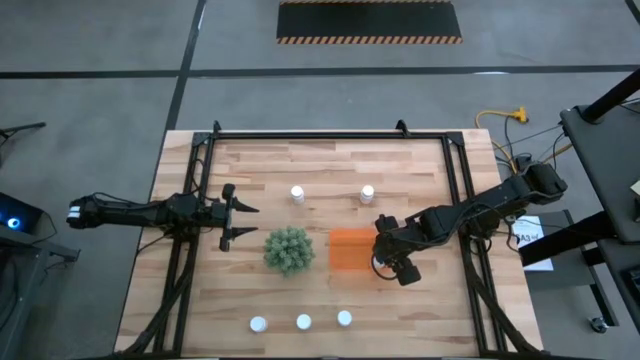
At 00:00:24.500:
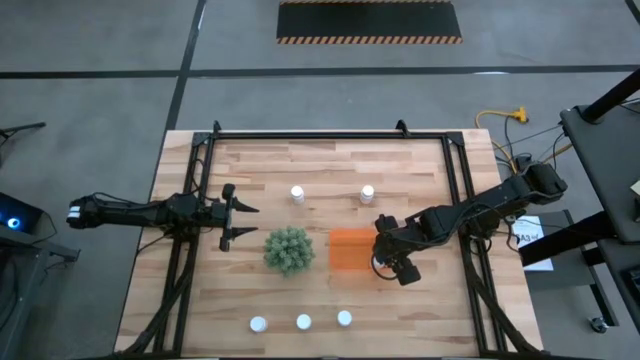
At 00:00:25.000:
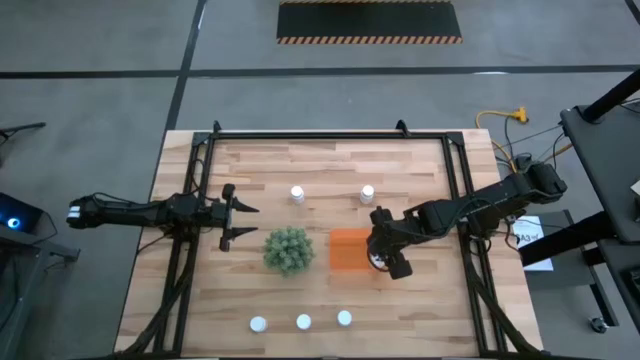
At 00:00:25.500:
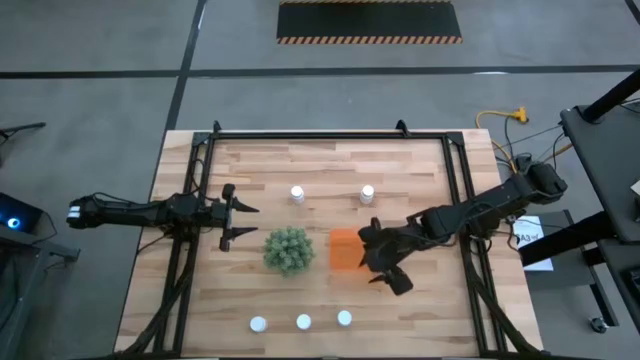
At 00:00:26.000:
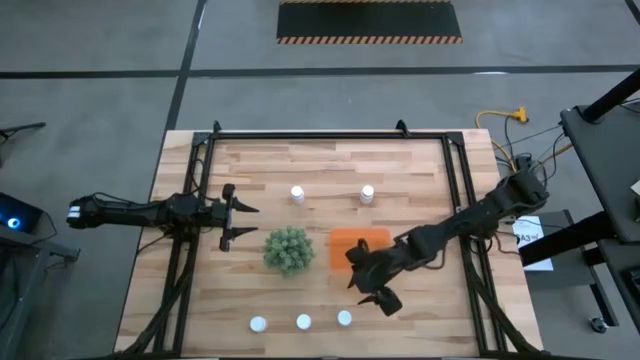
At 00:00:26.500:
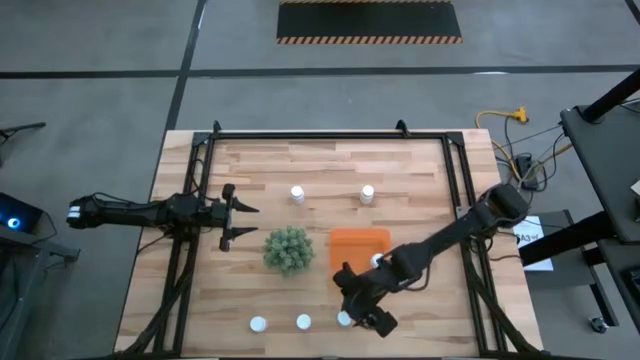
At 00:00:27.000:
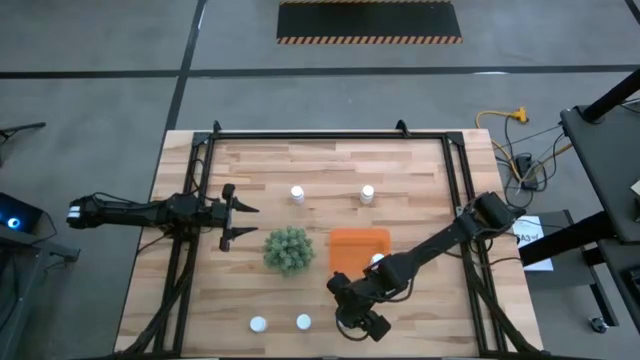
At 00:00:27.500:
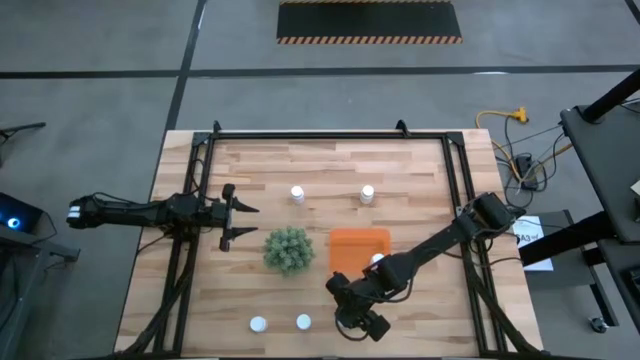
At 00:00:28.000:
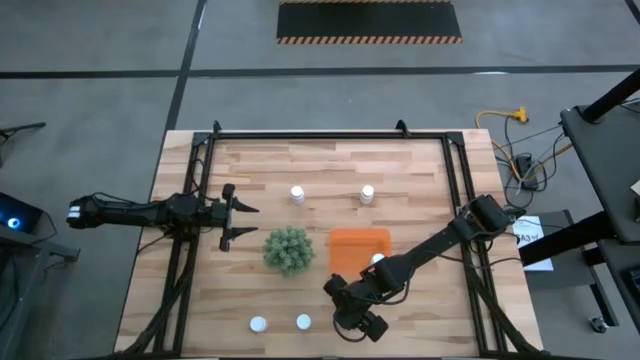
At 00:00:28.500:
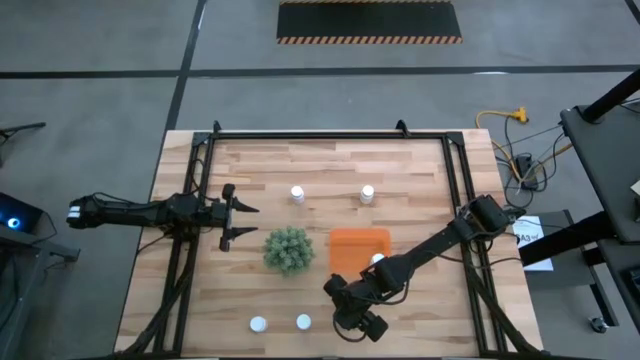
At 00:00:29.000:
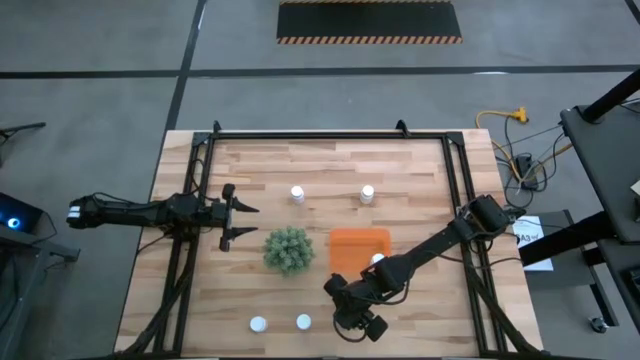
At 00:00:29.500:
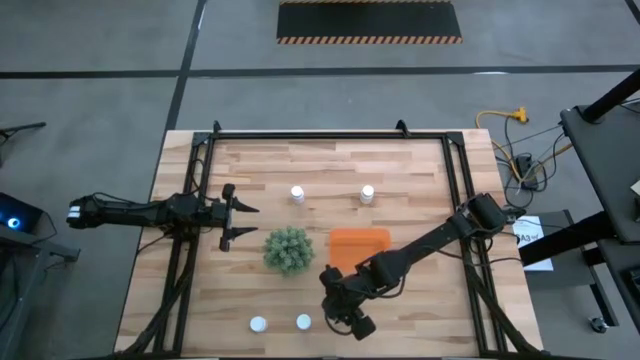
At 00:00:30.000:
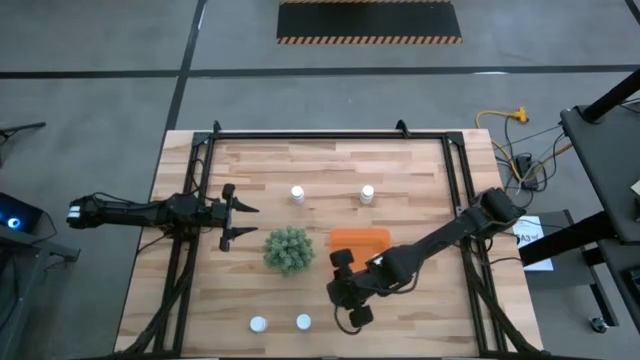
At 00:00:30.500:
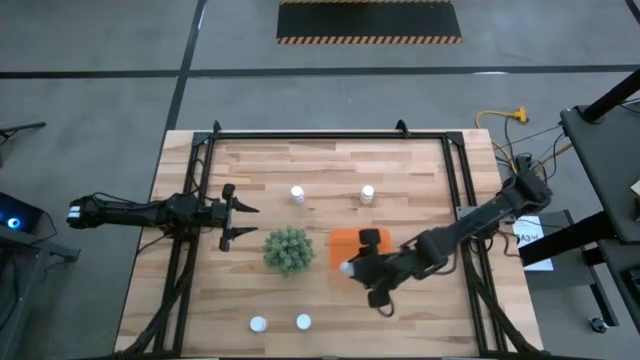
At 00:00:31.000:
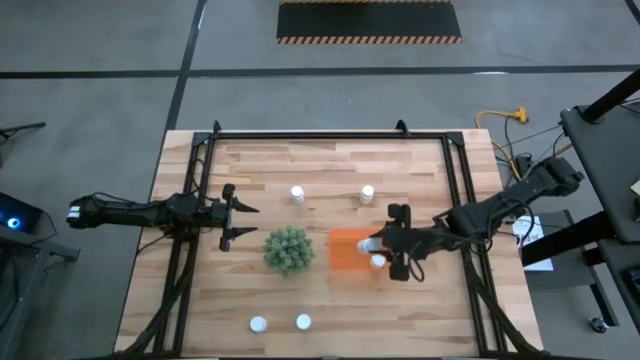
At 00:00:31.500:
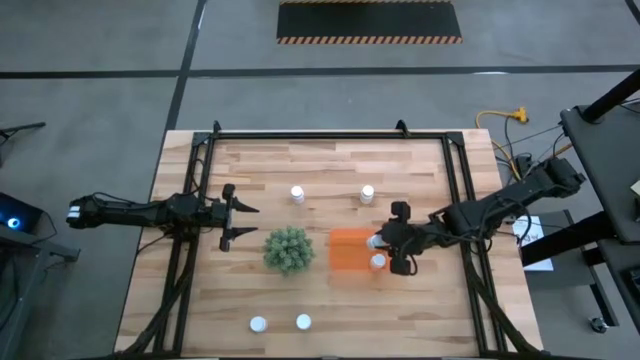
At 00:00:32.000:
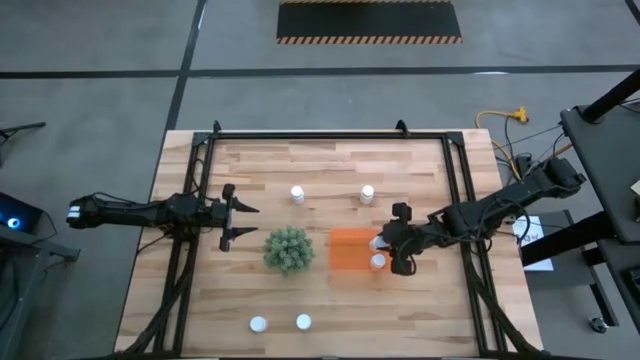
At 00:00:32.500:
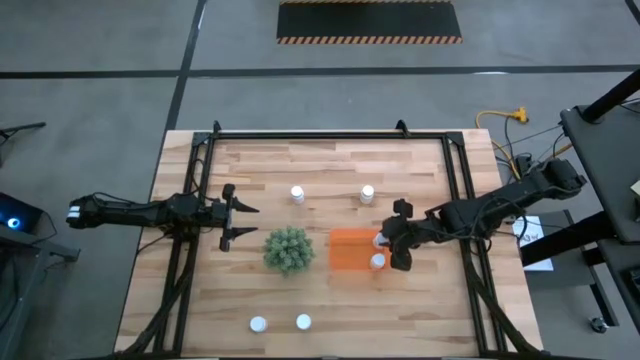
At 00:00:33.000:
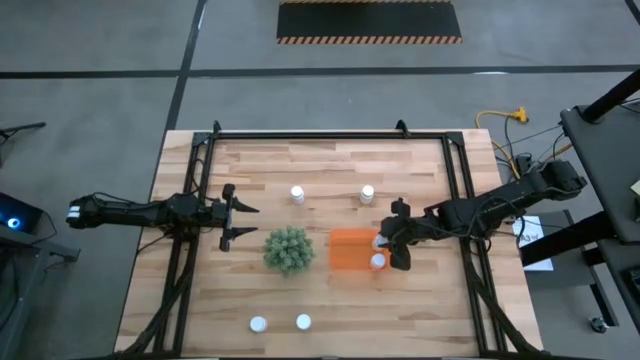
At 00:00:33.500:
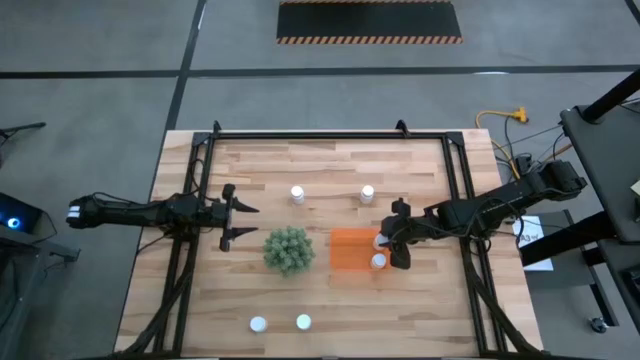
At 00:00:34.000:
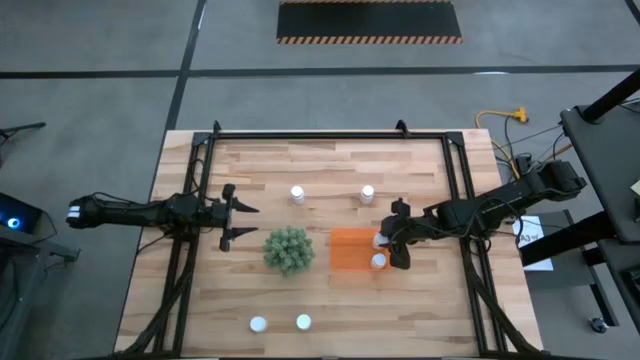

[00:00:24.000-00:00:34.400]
Task: Pick and place pill bottles into a basket
Put the white pill bottle into the orange bin

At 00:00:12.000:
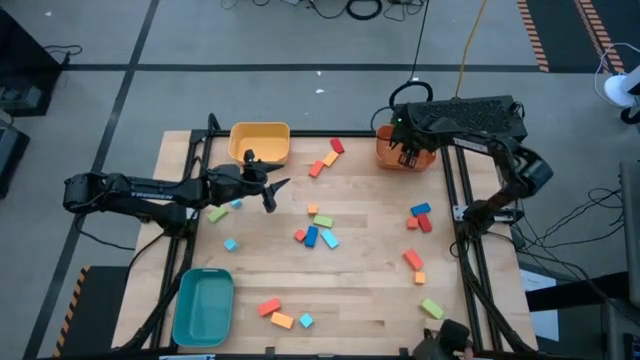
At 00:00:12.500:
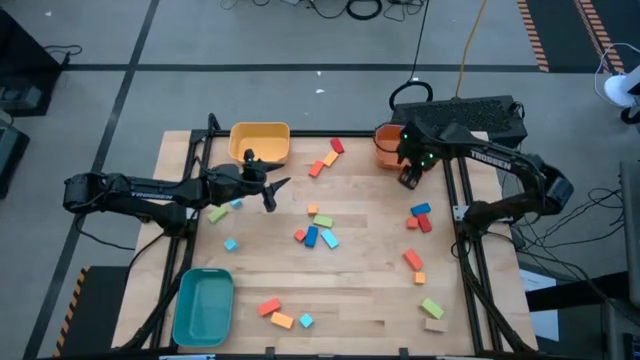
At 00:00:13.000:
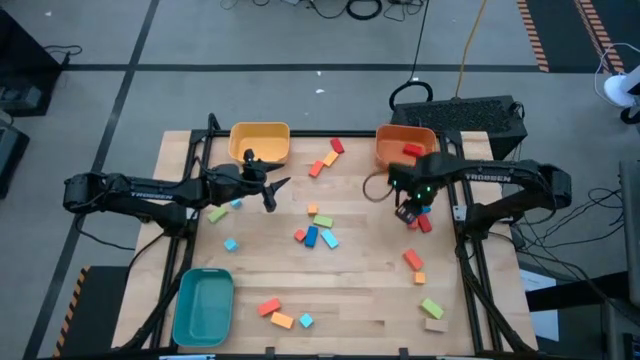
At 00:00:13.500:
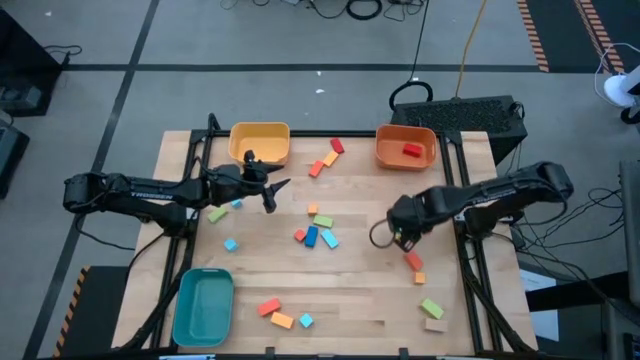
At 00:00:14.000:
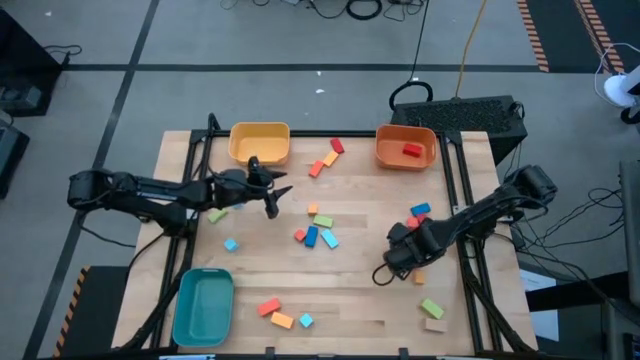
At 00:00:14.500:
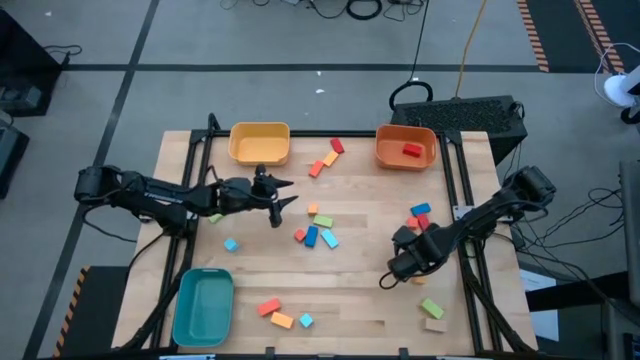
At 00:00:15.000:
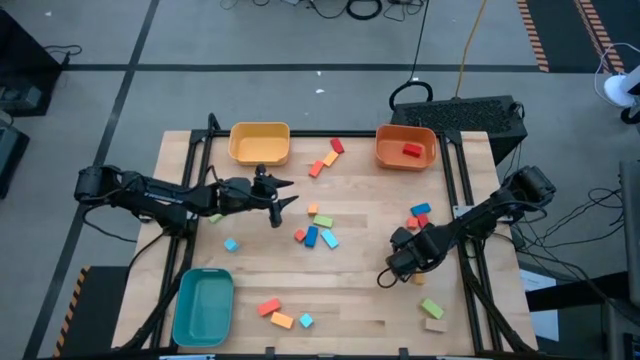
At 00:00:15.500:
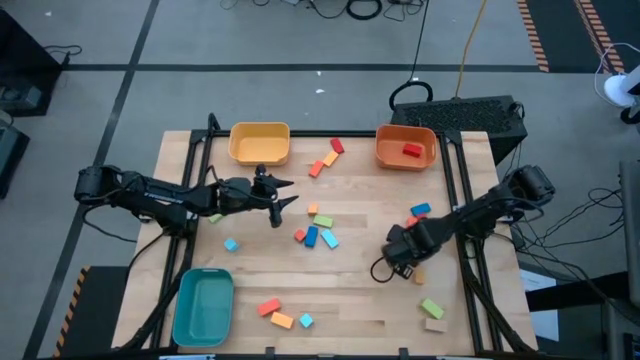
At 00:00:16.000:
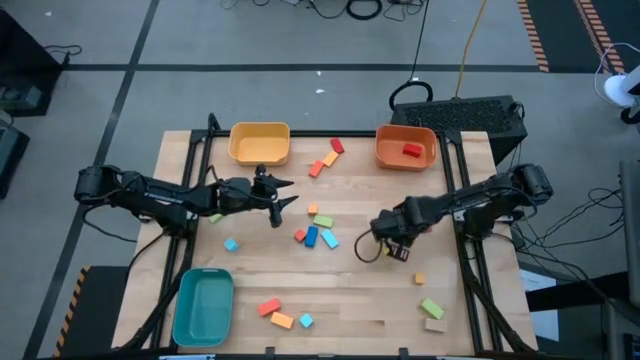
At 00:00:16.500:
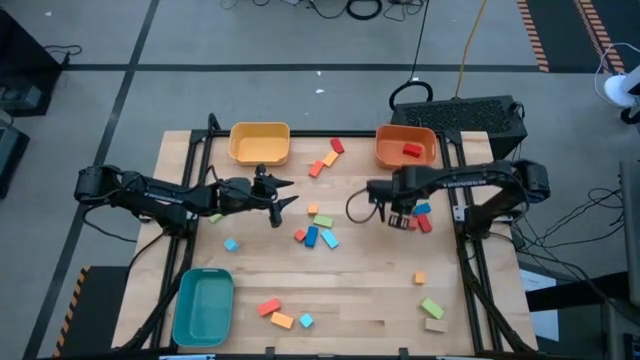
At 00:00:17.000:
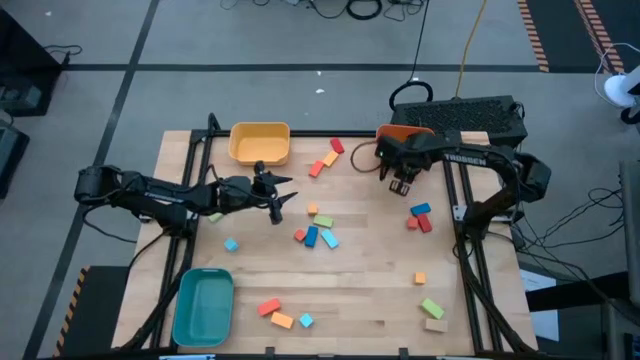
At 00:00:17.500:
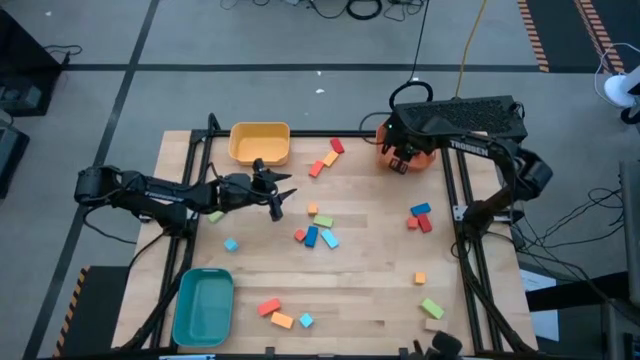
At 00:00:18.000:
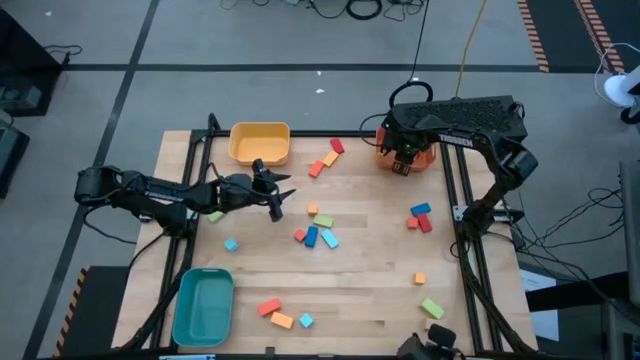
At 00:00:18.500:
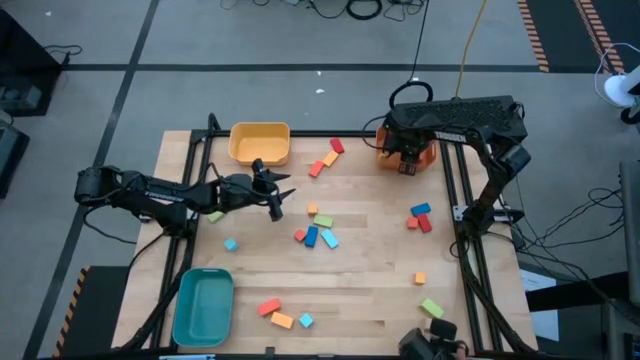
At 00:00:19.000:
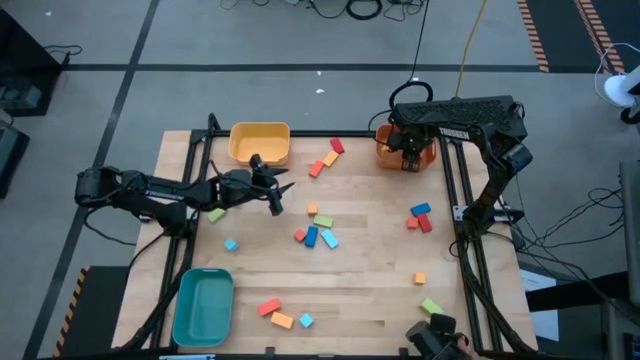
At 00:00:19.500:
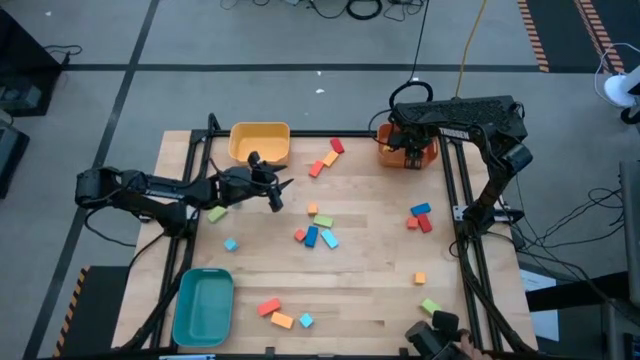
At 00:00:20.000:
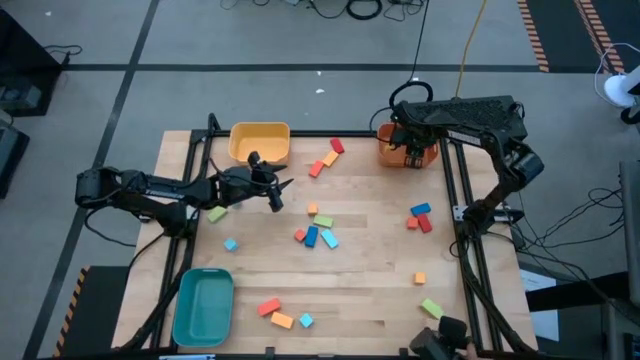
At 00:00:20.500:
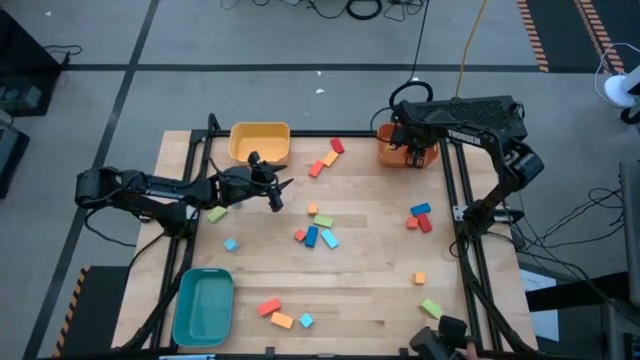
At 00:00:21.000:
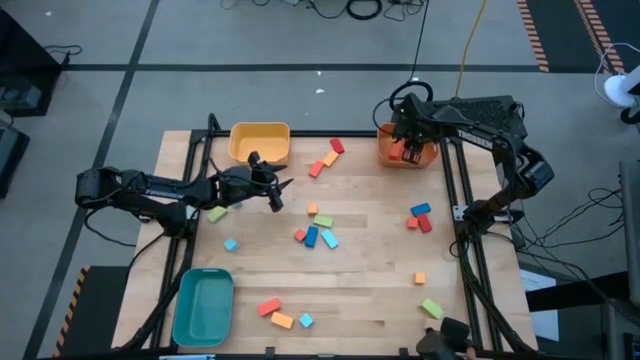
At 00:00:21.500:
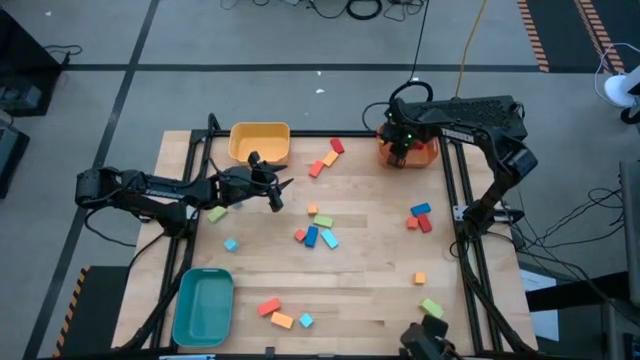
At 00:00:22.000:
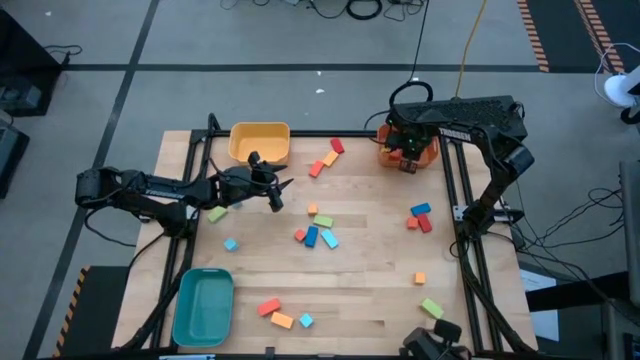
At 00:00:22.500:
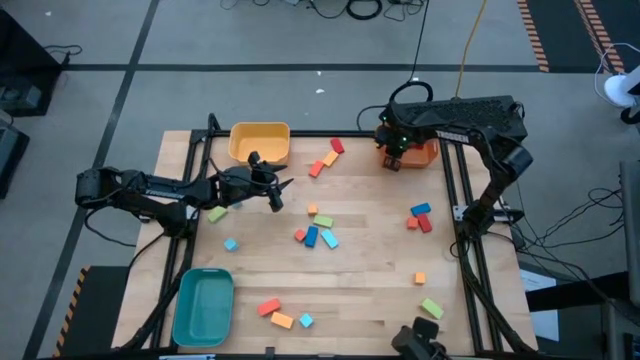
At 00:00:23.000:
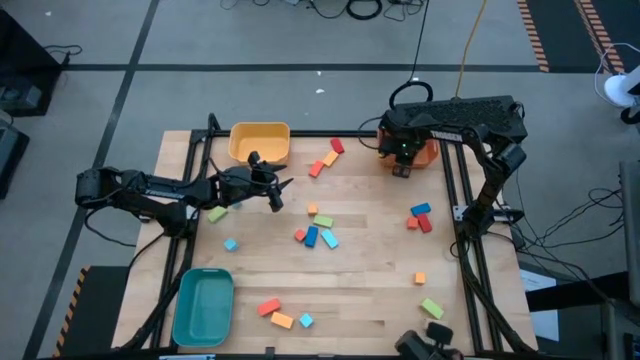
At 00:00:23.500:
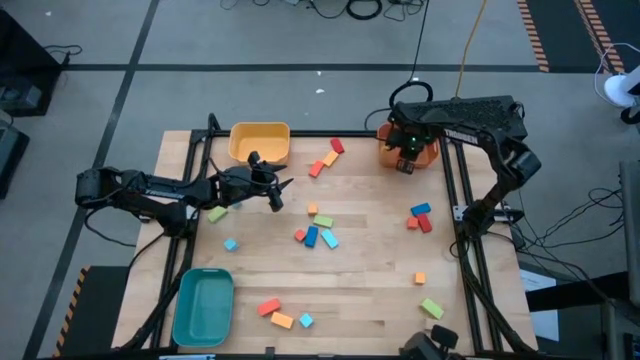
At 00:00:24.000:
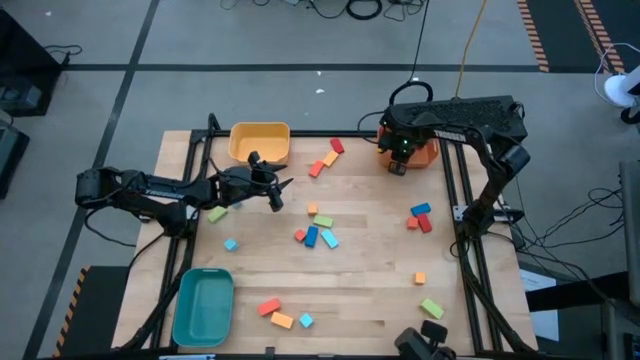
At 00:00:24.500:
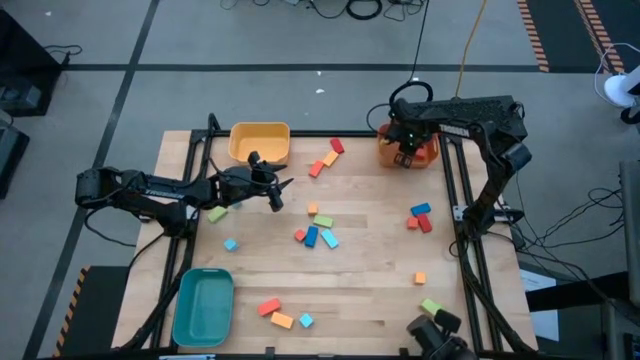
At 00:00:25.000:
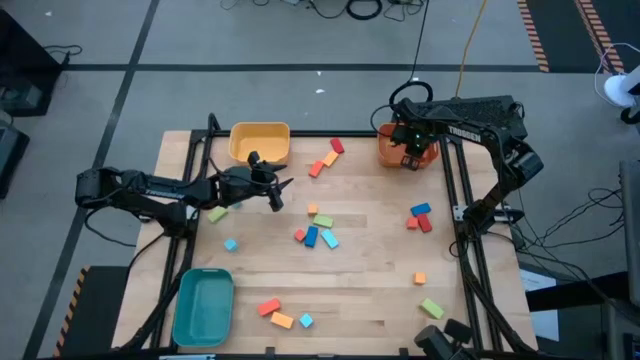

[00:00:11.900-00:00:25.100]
Task: Sort blocks by size
Put the large orange block into the orange bin
